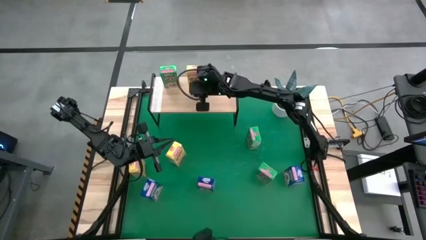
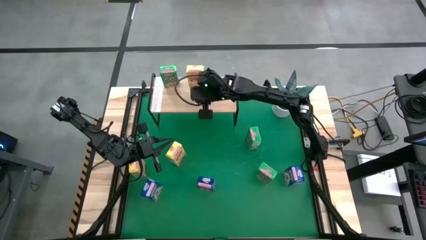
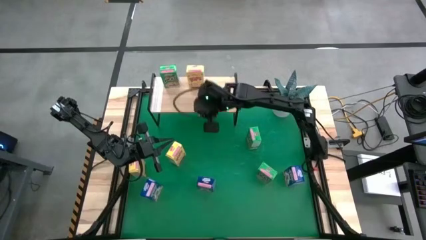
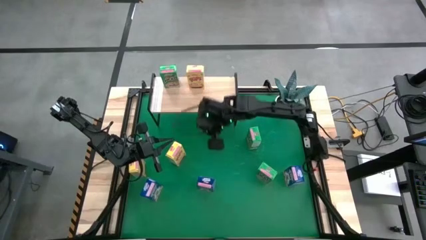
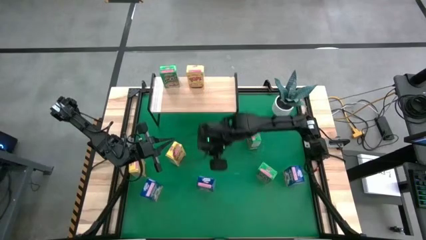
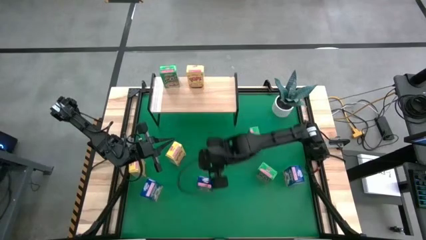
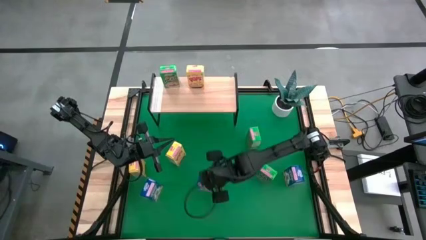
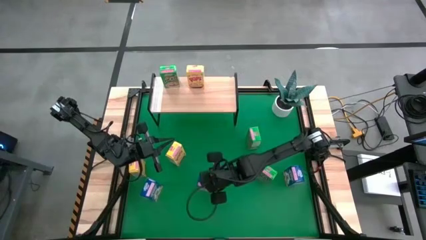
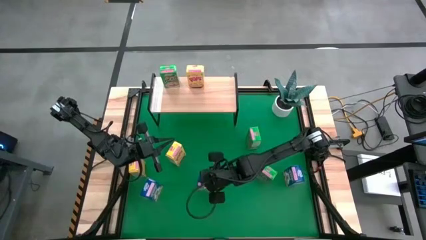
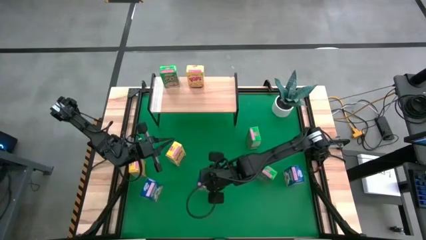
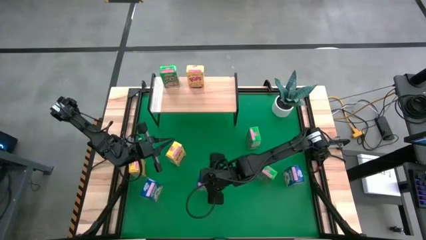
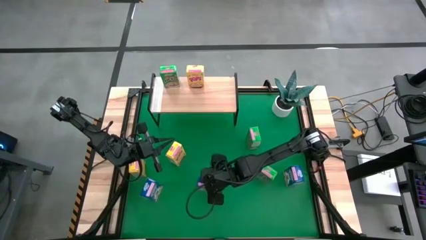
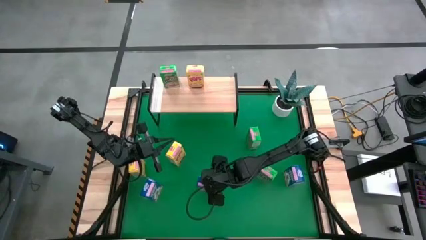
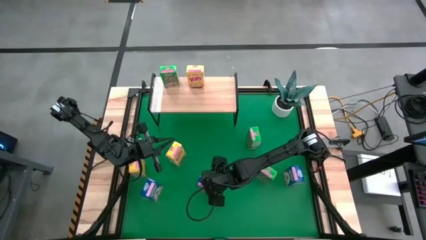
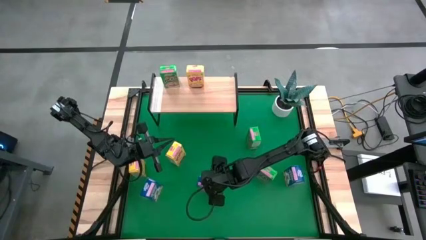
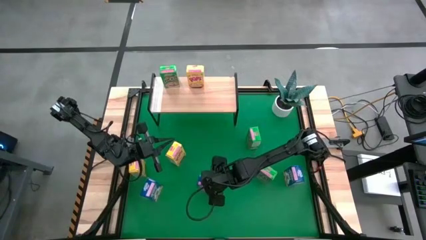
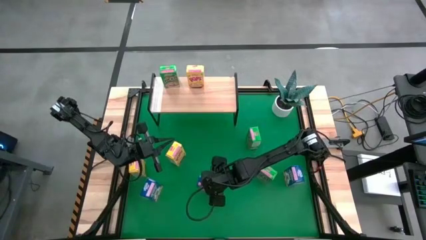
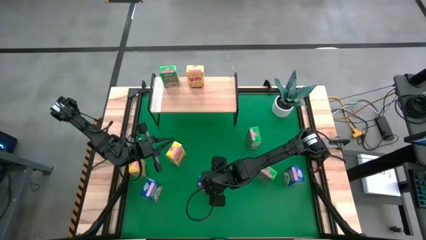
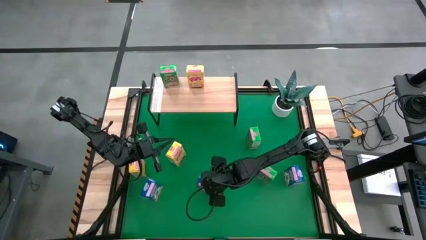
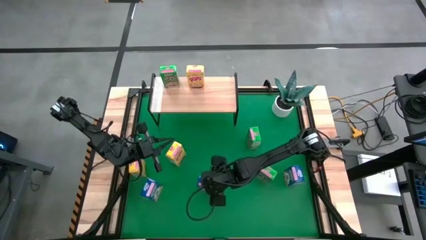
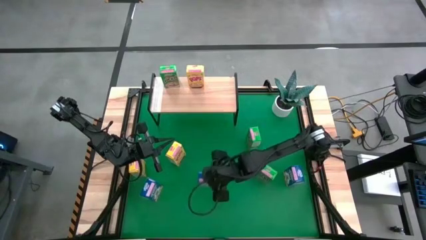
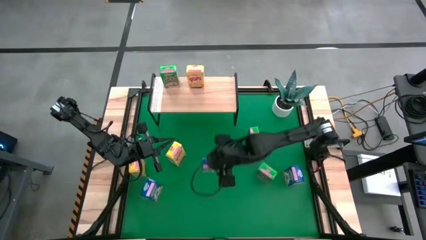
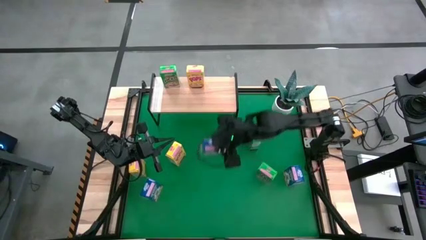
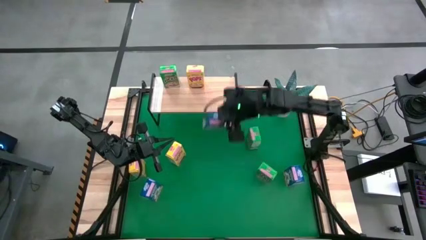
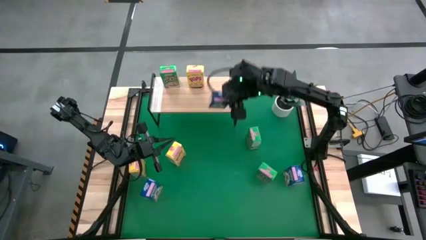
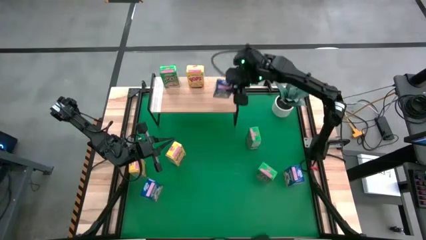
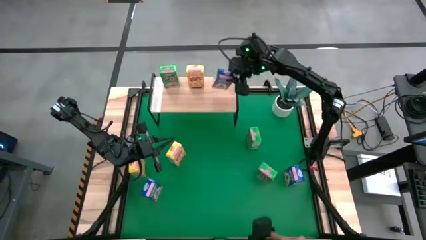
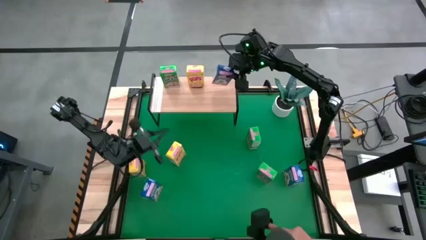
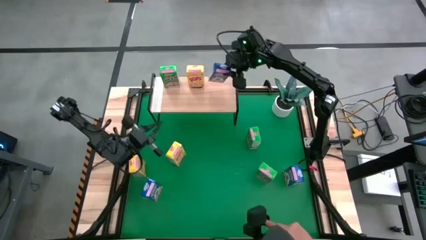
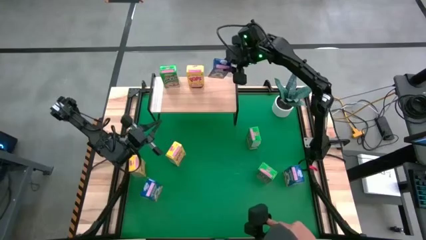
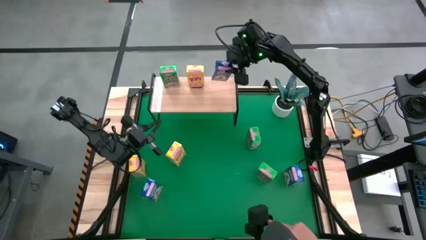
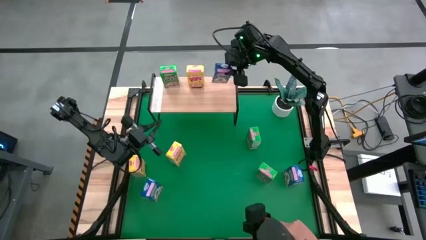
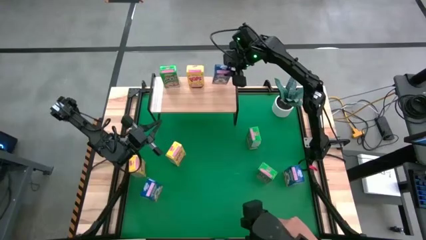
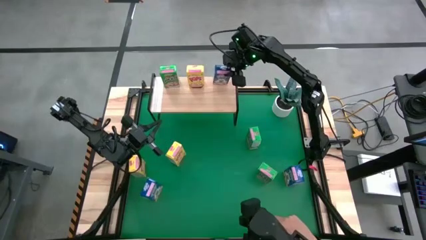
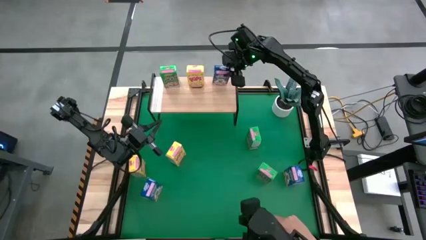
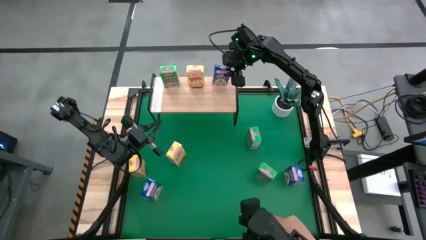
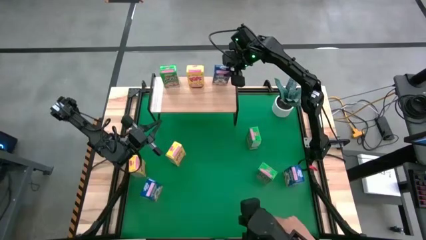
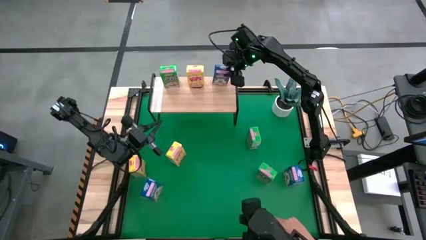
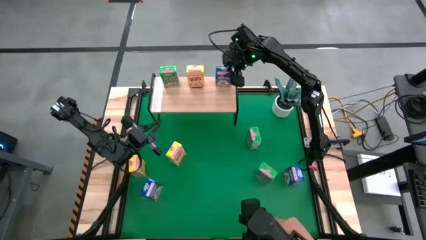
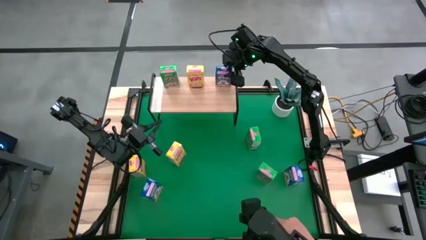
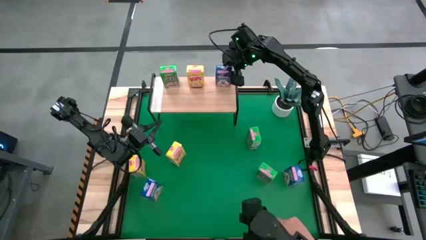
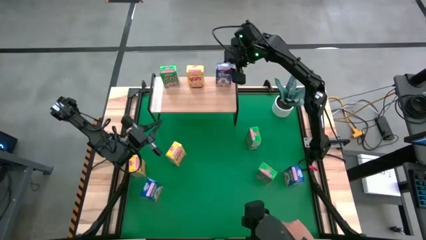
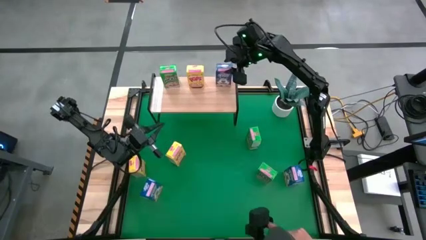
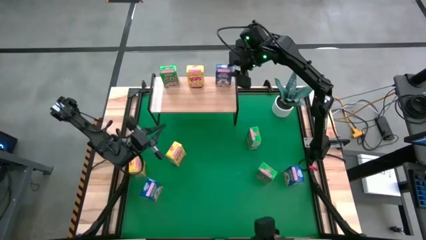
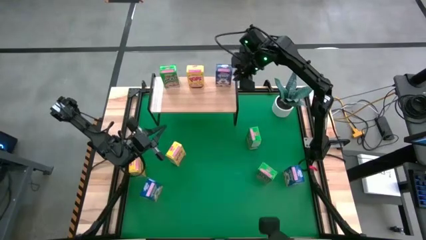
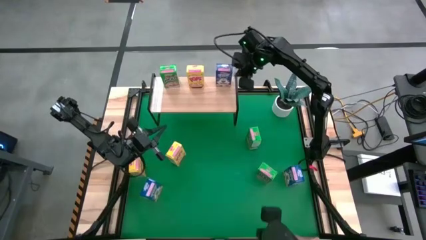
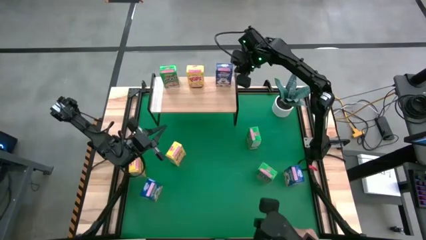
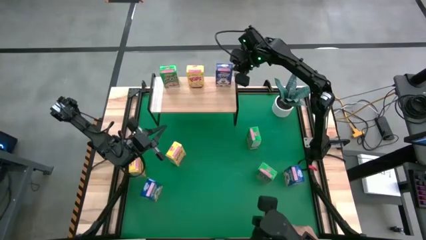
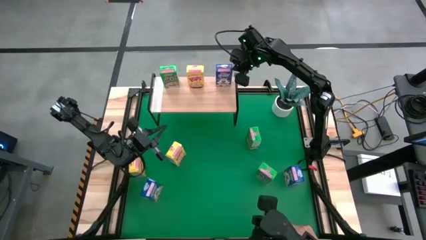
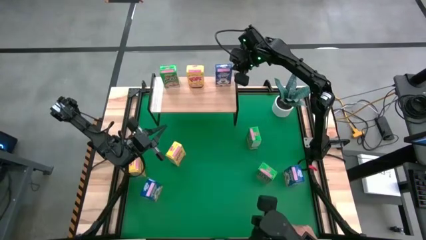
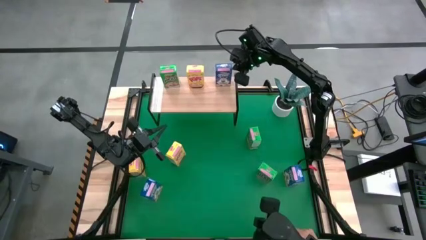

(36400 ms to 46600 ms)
Task: Stack cereal on shelf
Put the middle blue cereal box on the shelf

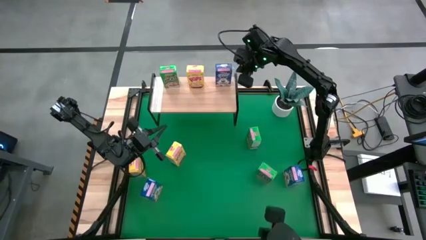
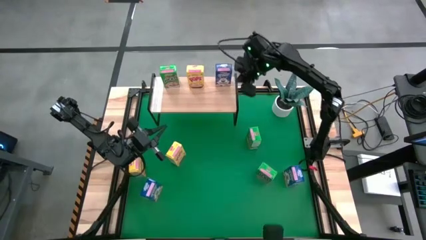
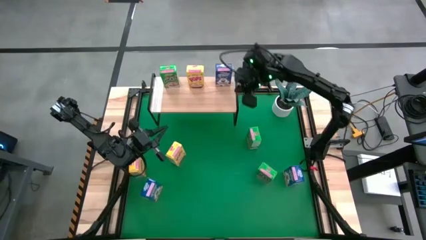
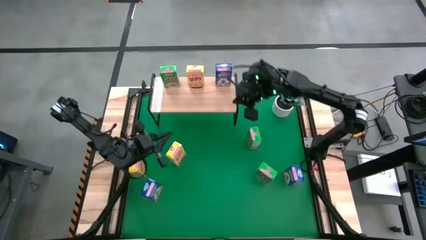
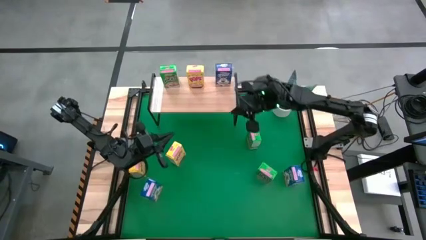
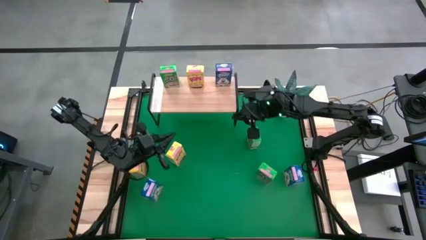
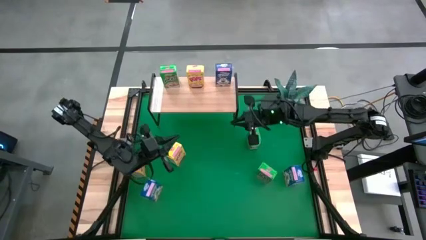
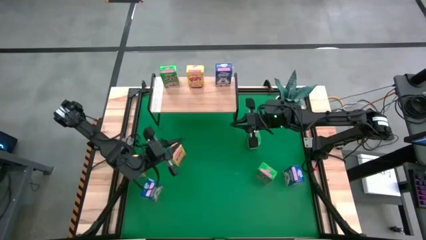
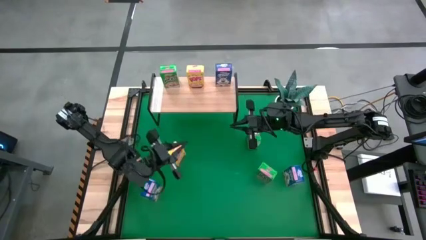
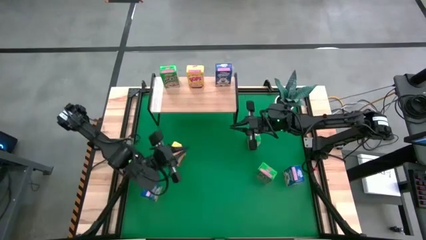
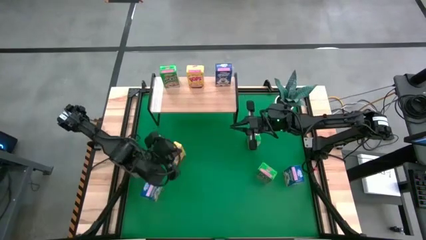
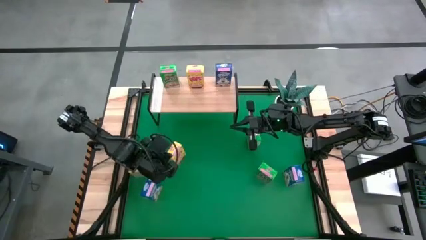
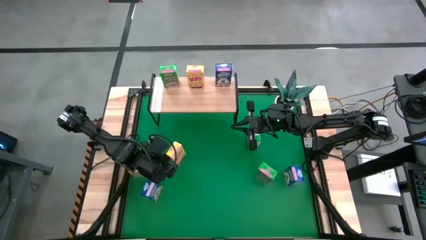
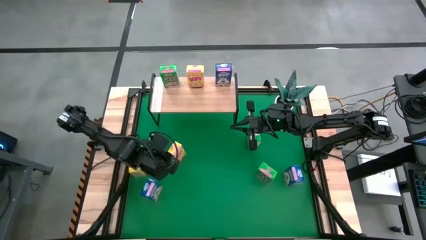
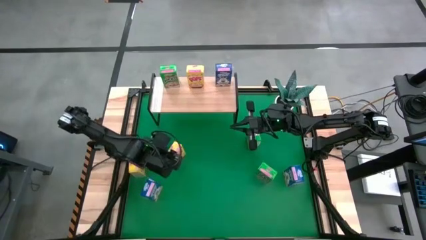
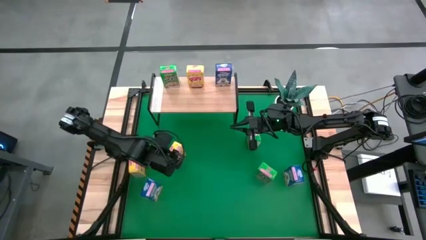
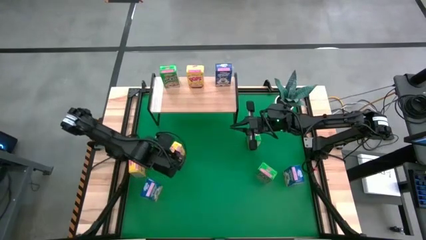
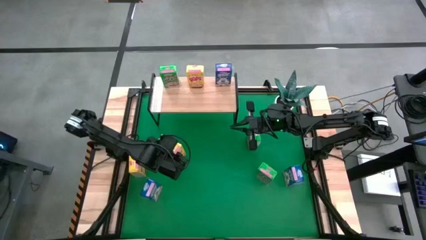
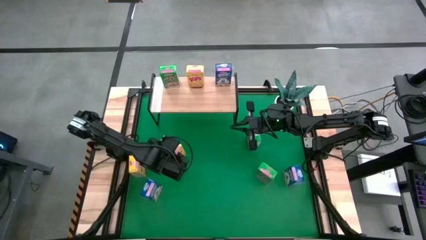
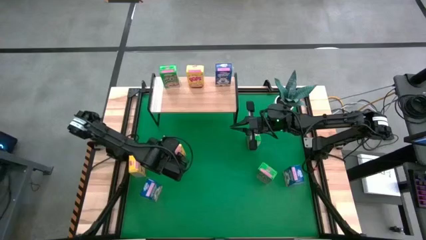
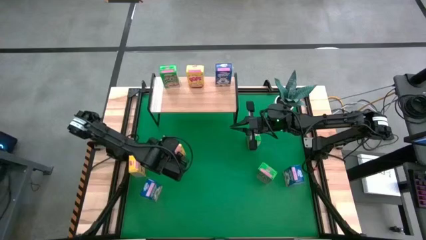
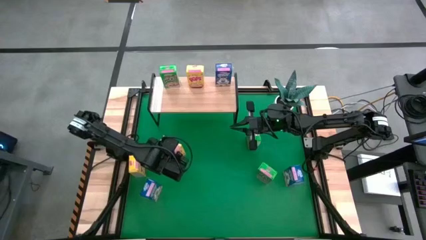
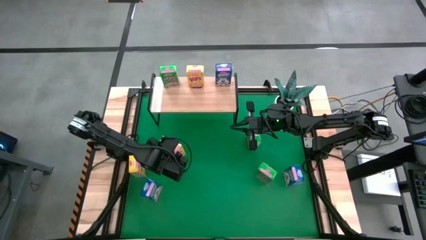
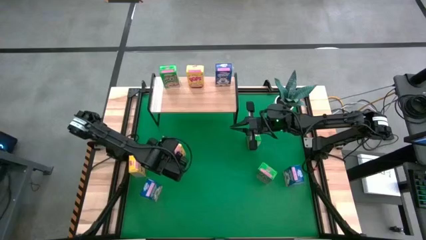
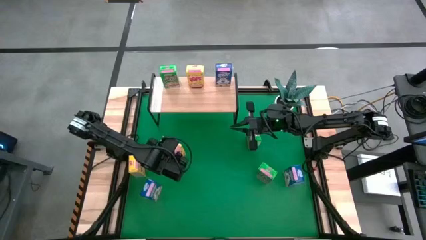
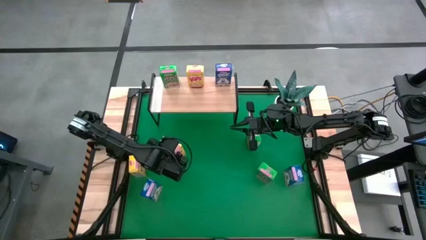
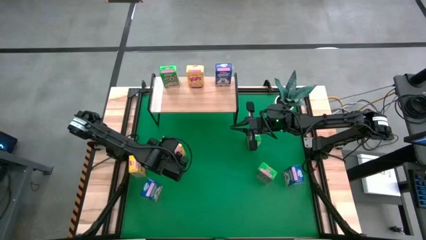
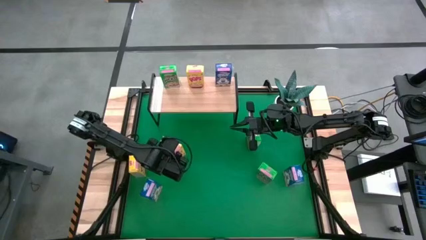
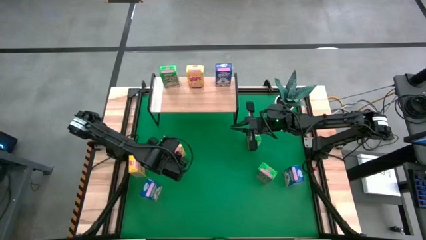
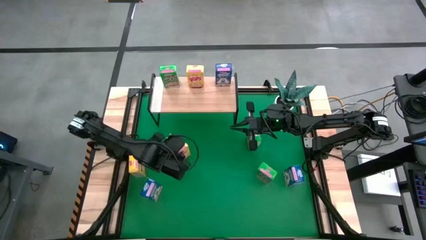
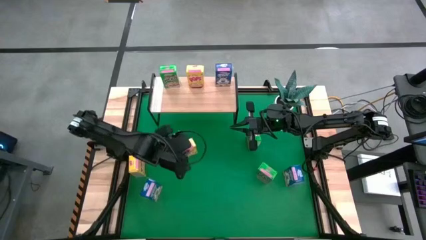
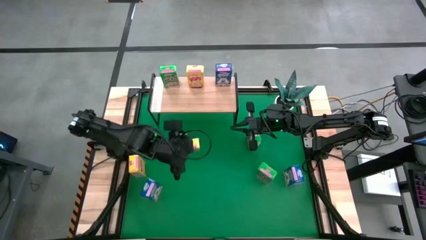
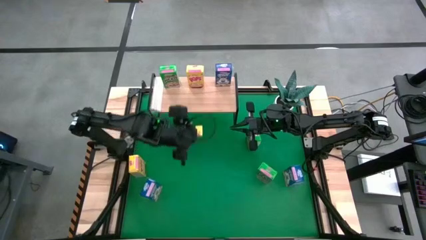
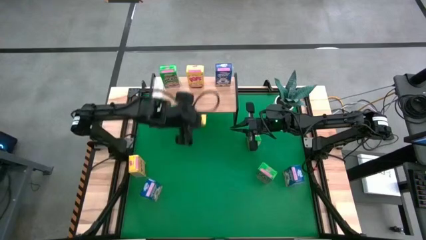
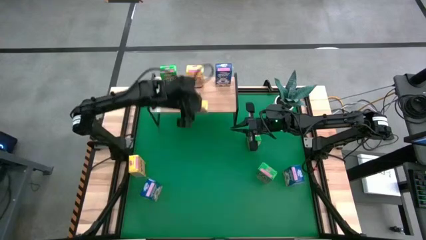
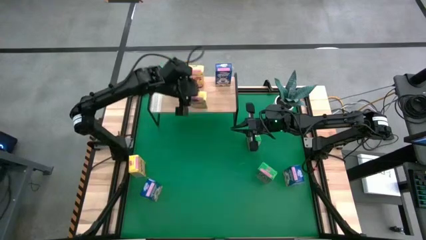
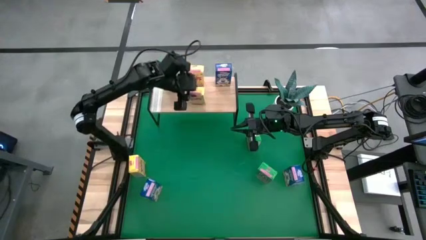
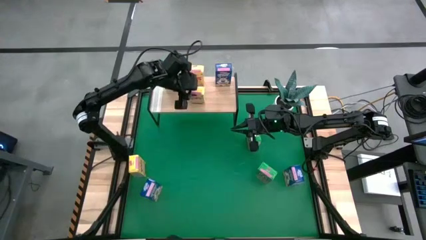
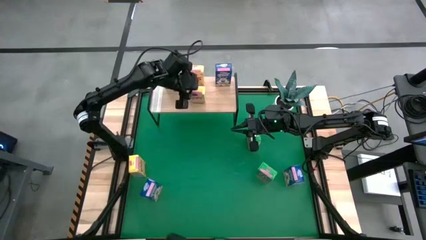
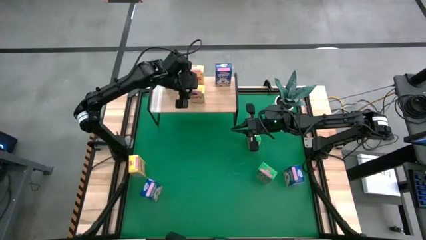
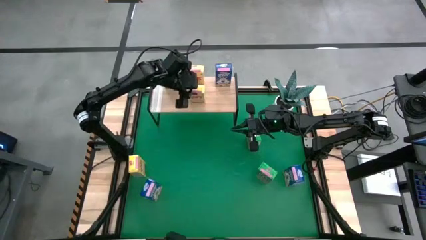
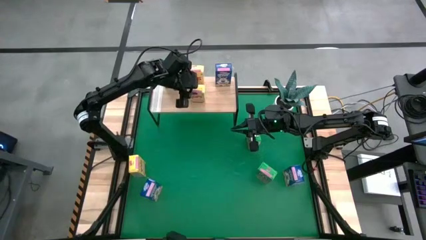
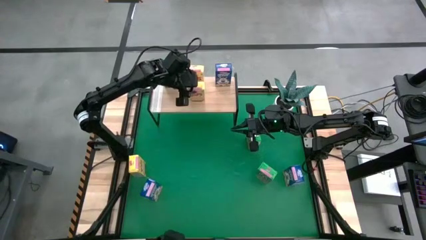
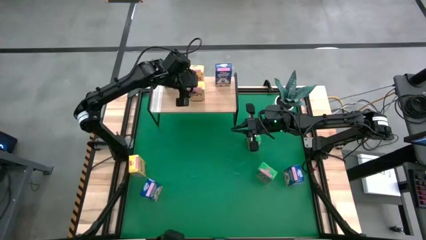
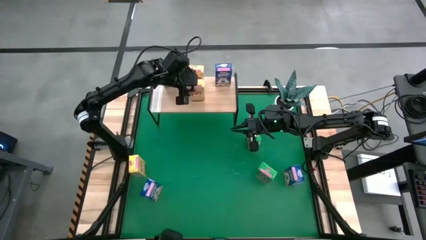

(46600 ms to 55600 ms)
Put the right yellow cereal box on the shelf aligned with the other yellow cereal box
